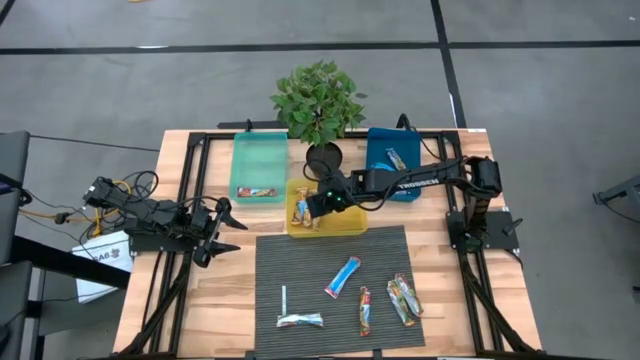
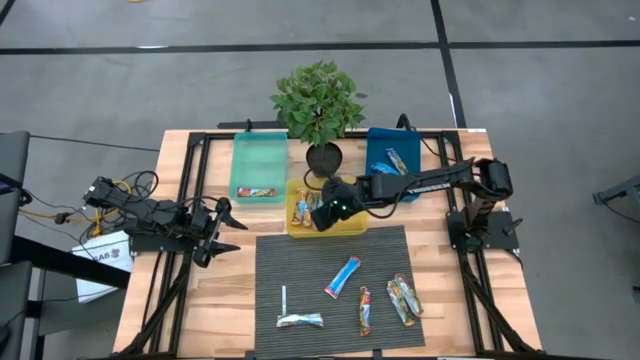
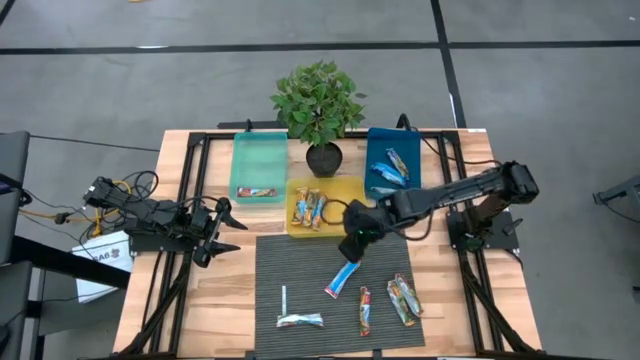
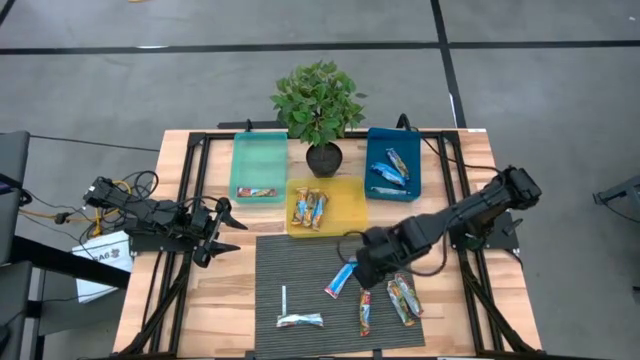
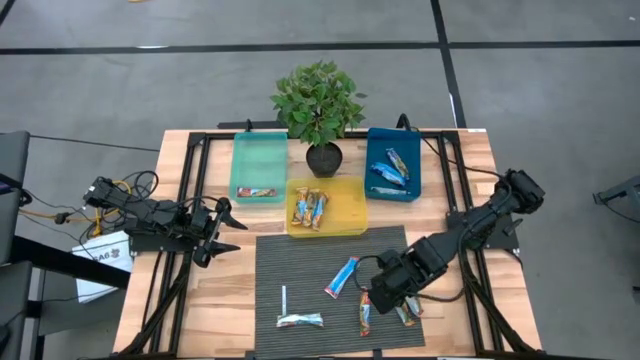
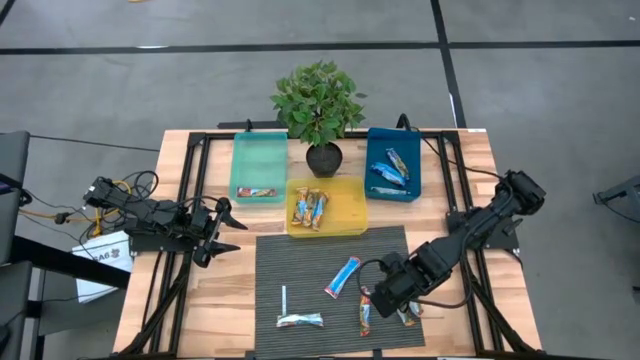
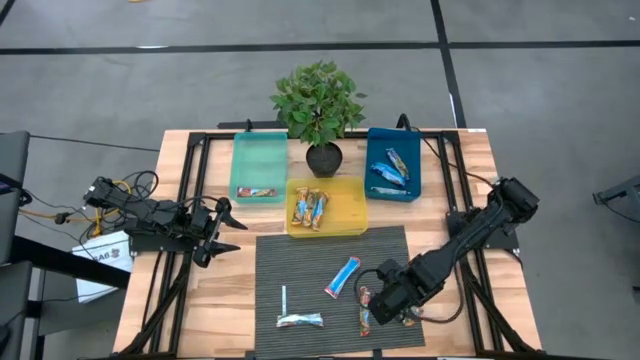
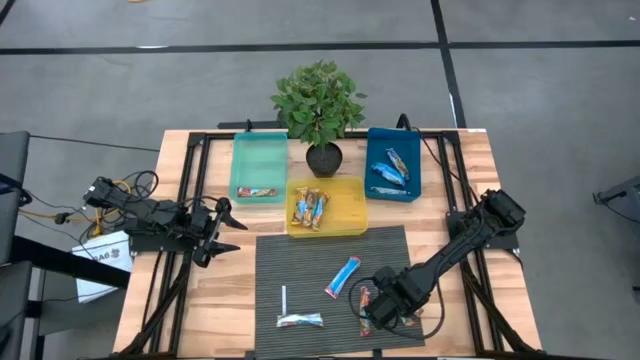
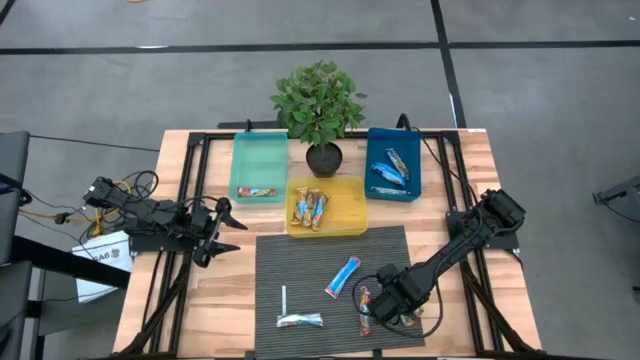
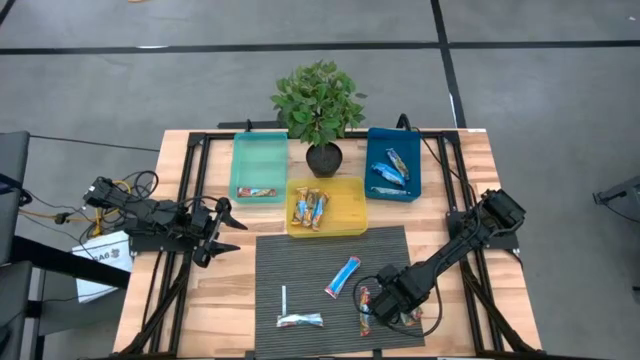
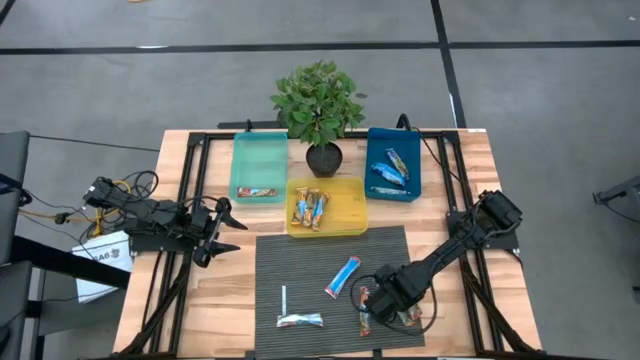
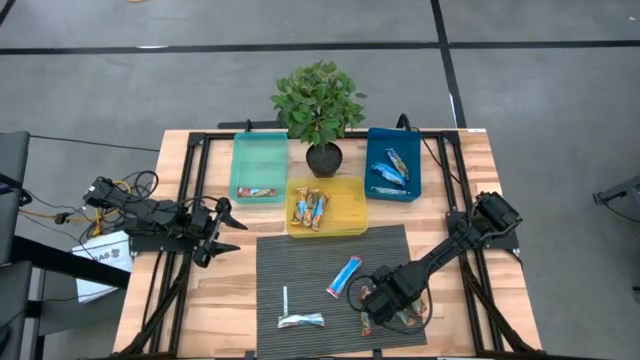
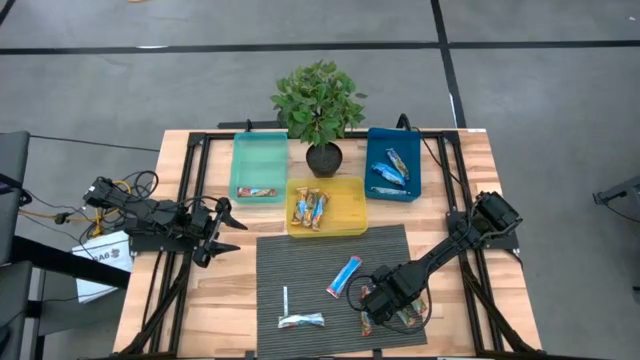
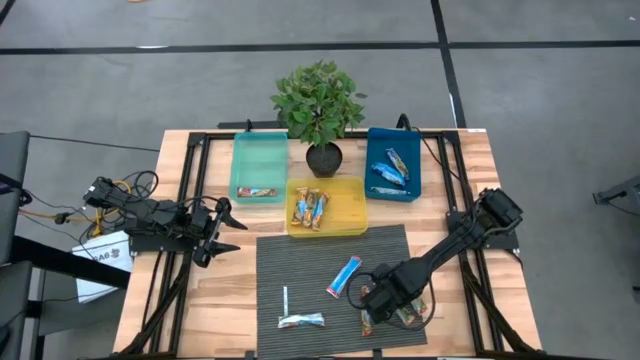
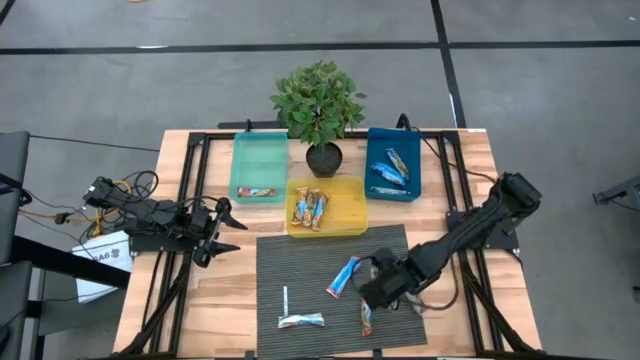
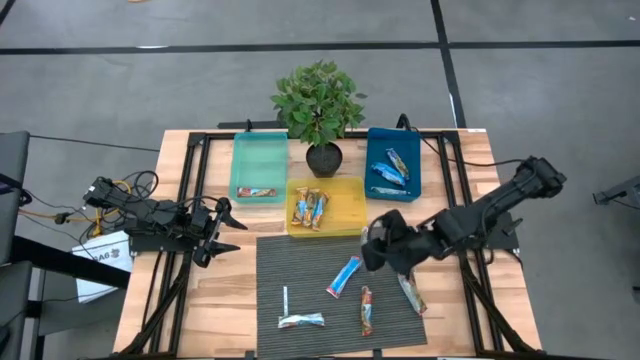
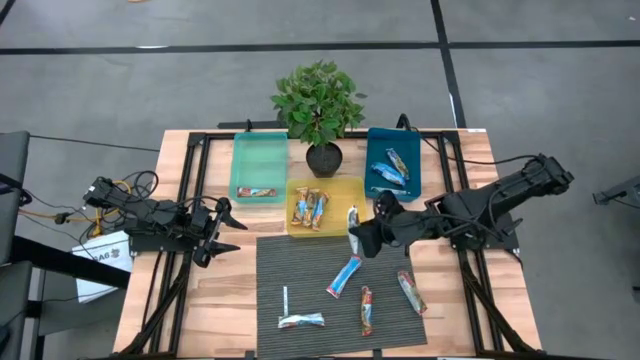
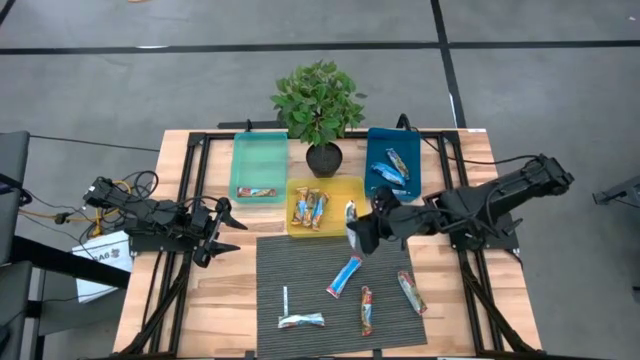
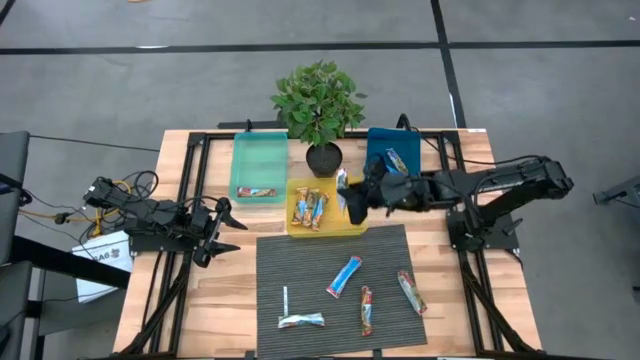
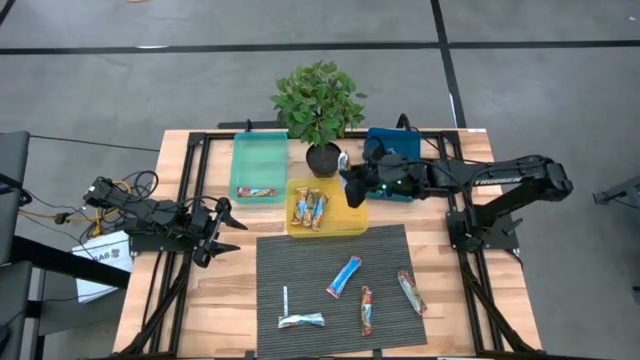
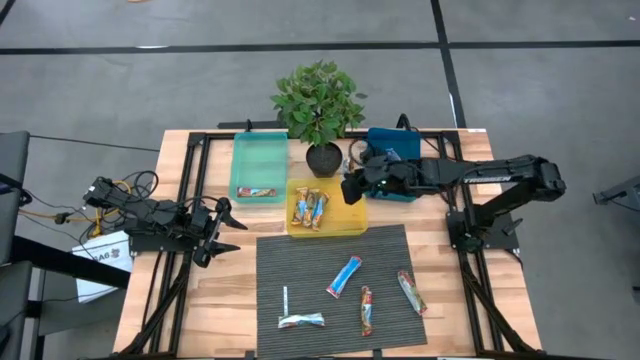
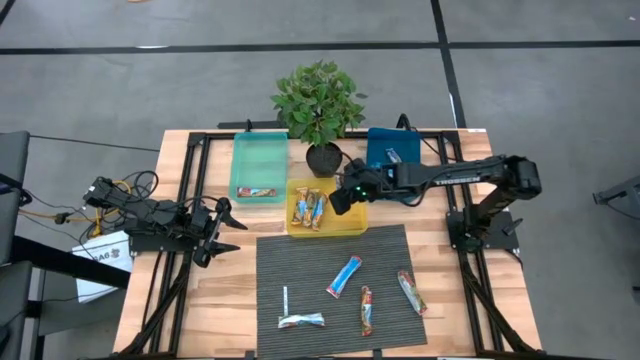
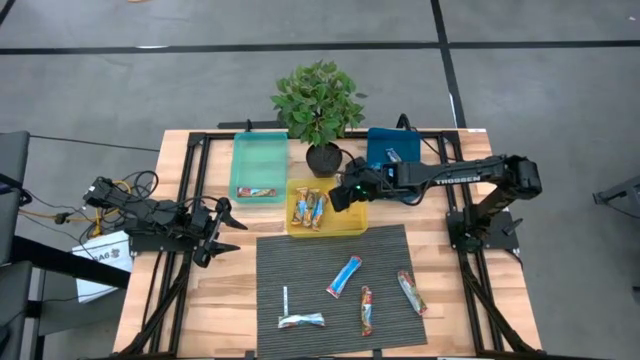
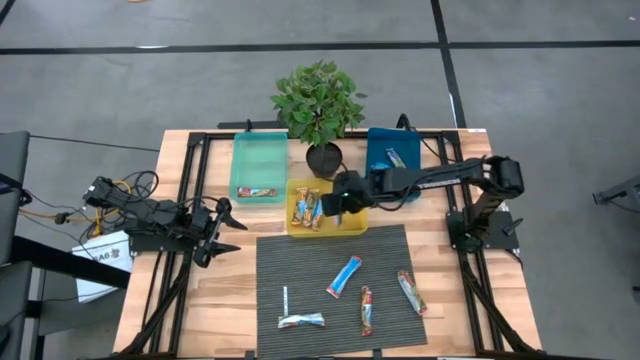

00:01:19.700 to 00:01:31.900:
Task: Pick and place Granola Bars by type
Put the orange granola bar into the yellow bin

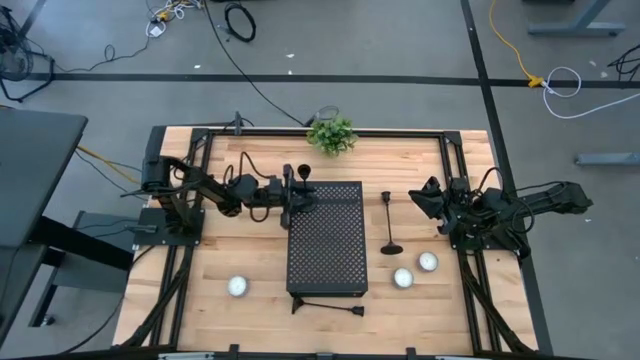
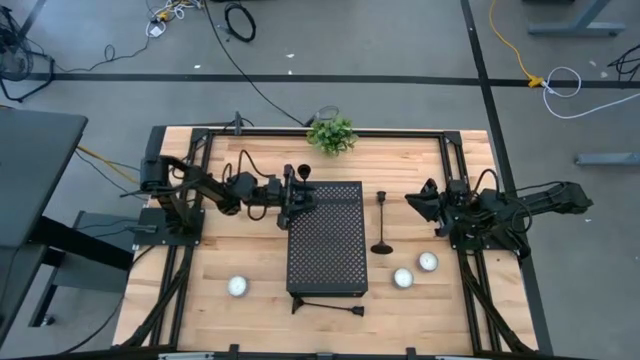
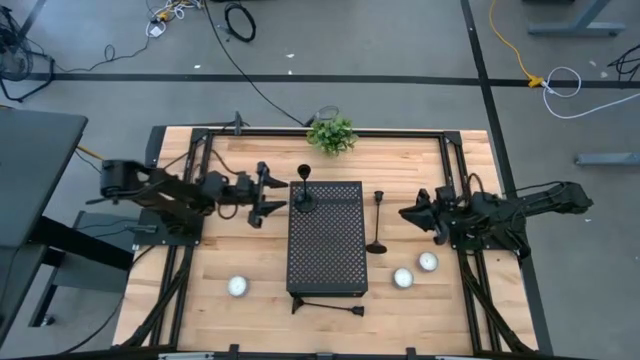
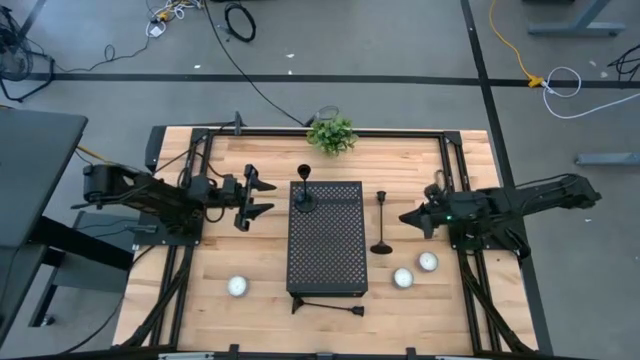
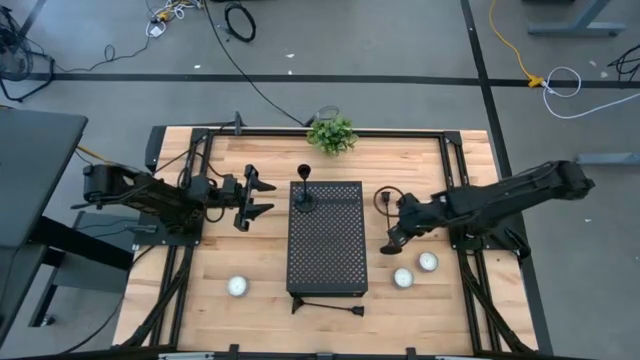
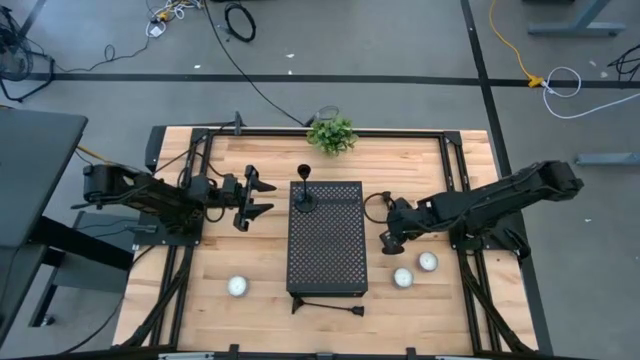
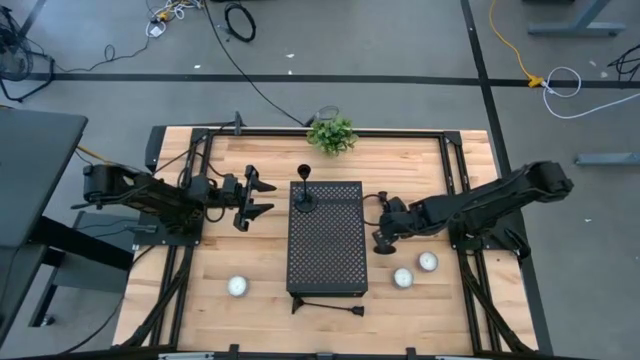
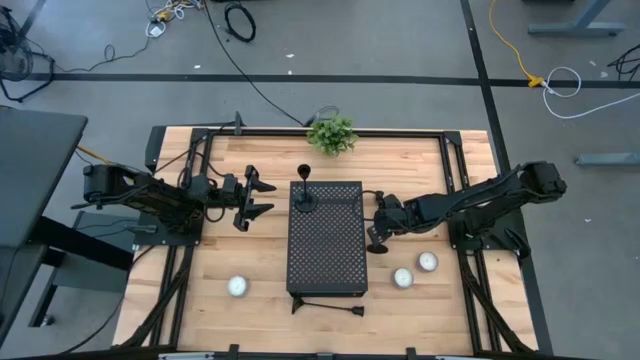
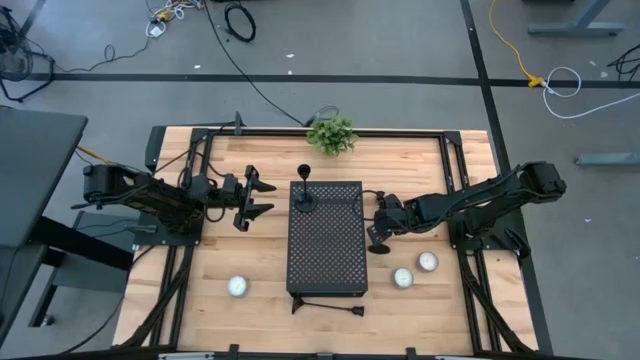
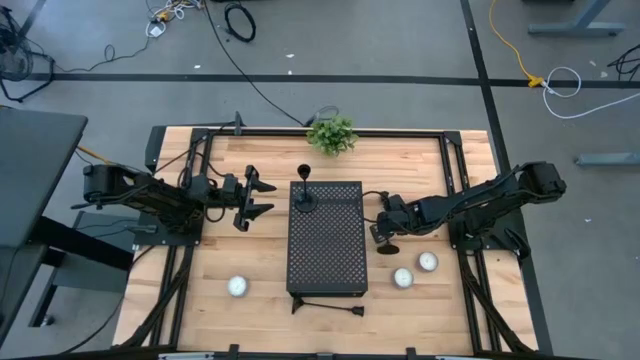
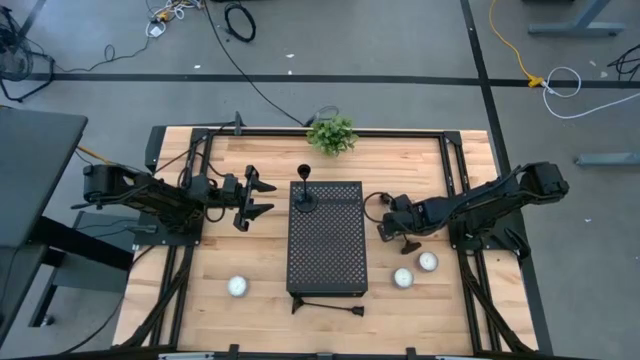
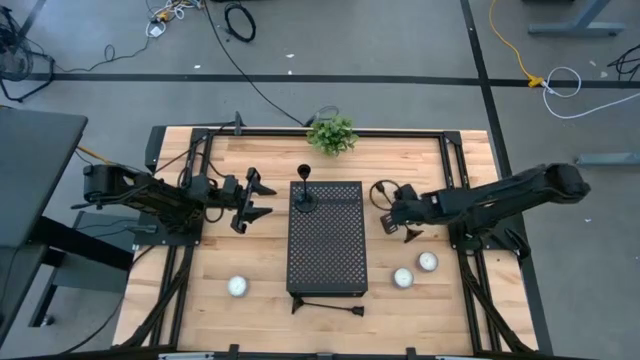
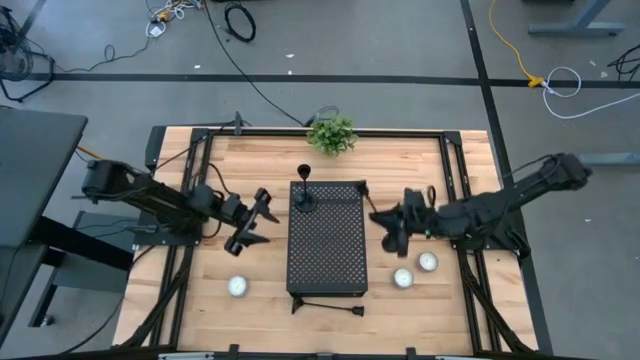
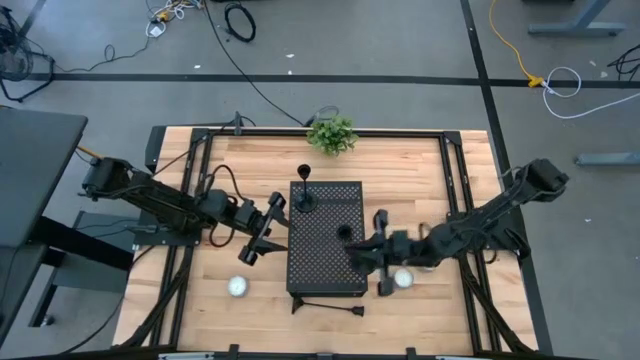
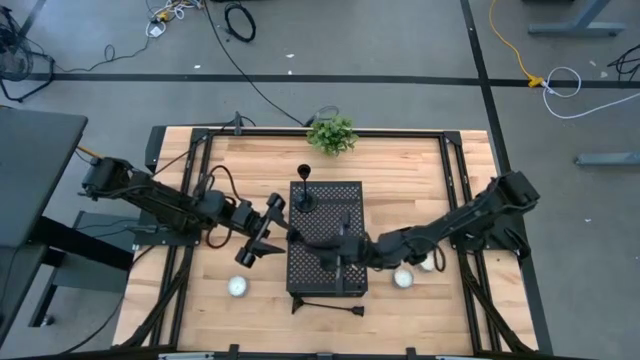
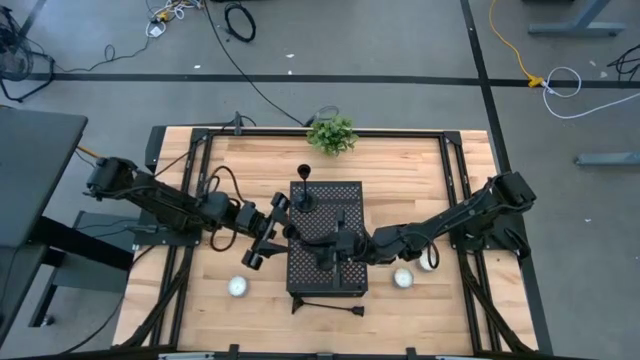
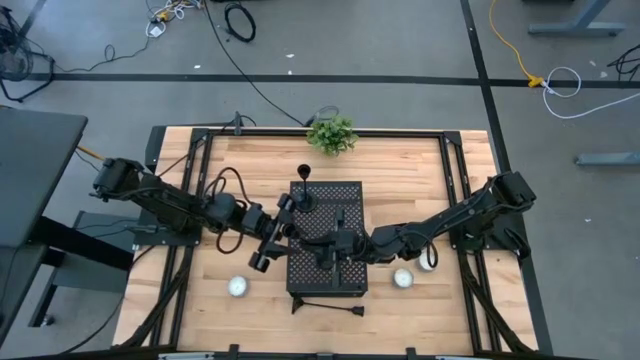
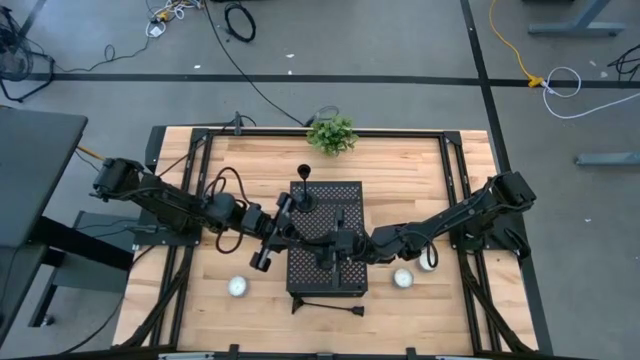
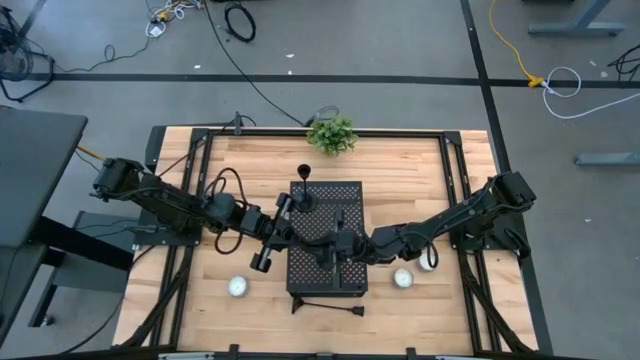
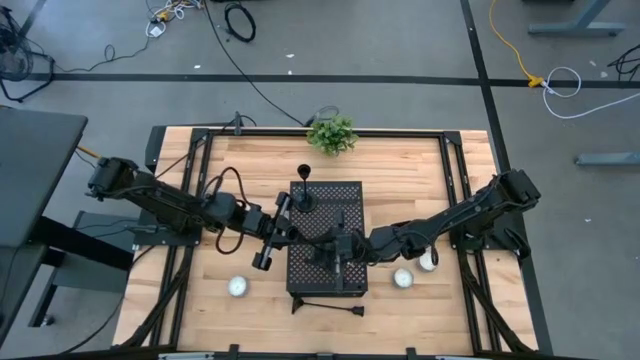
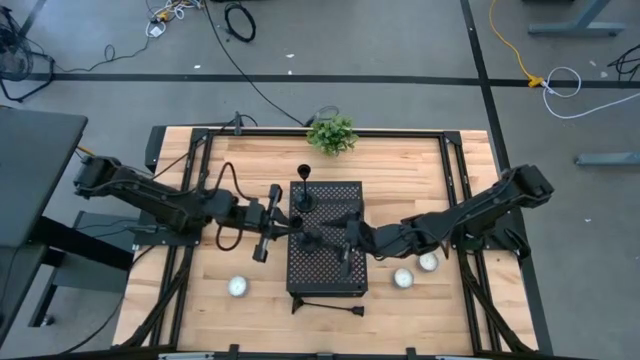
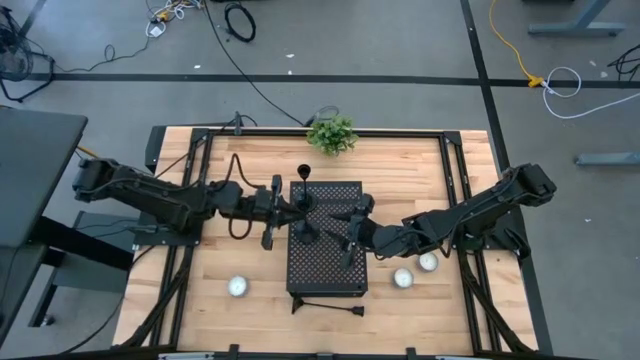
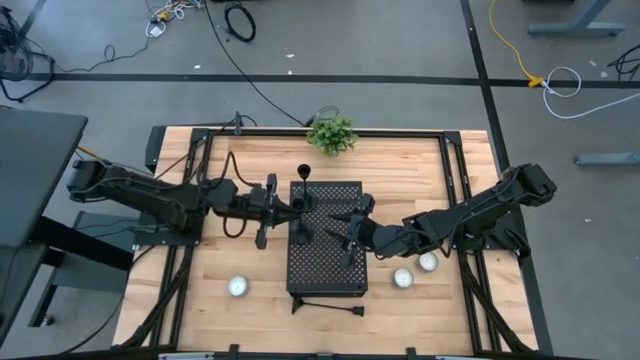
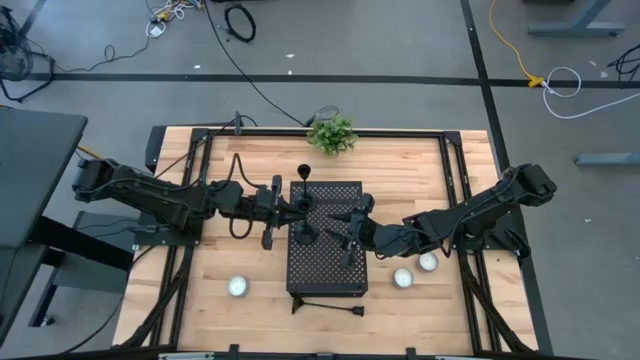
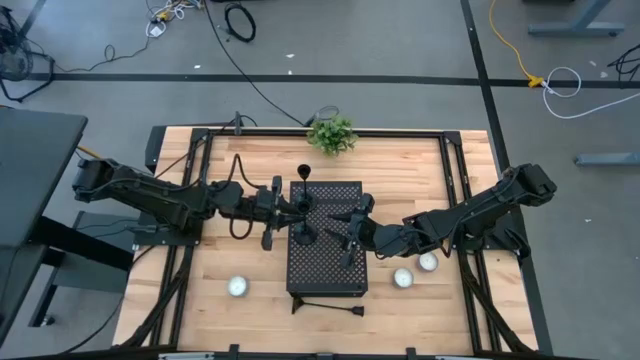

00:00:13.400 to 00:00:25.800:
Task: Pick & Place candle stick holders
Put the top black candle holder on the shelf aligned with the other black candle holder
